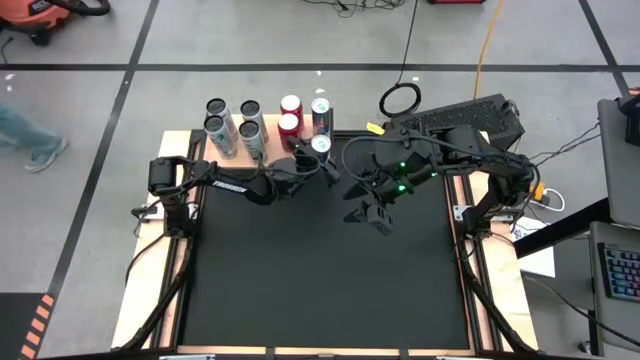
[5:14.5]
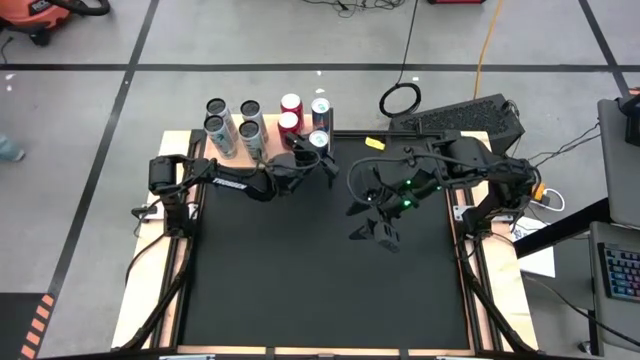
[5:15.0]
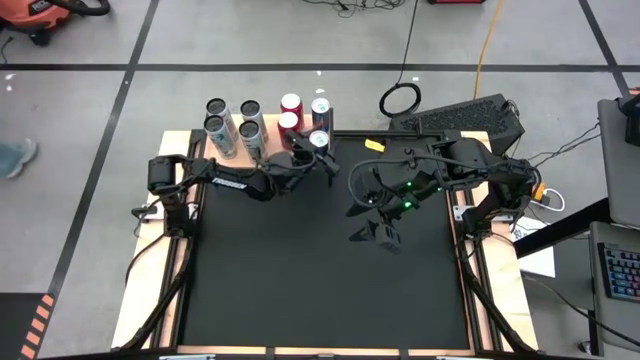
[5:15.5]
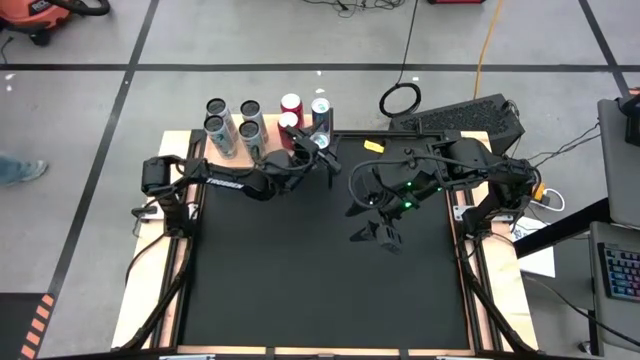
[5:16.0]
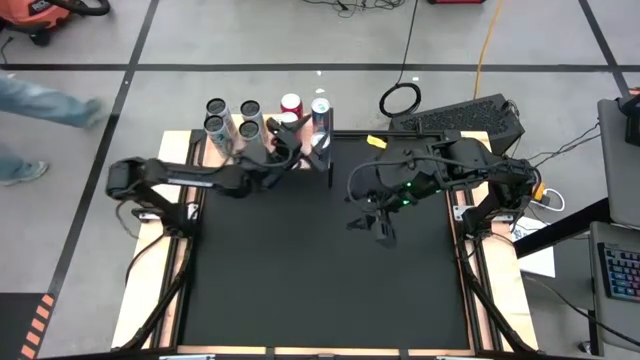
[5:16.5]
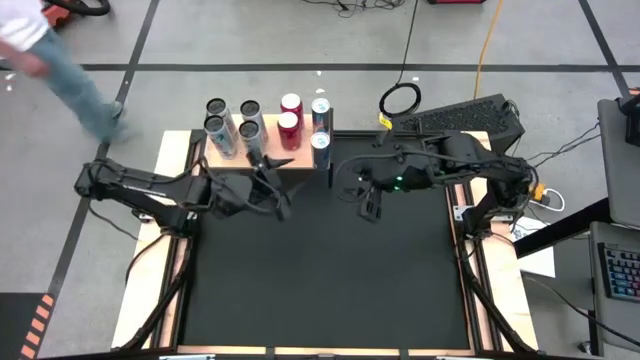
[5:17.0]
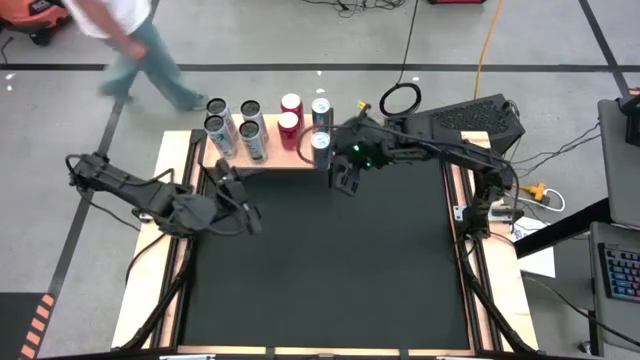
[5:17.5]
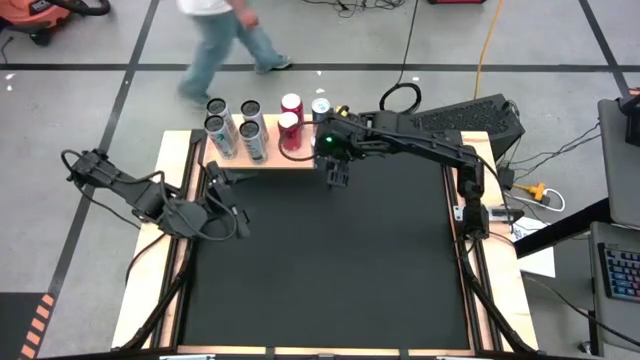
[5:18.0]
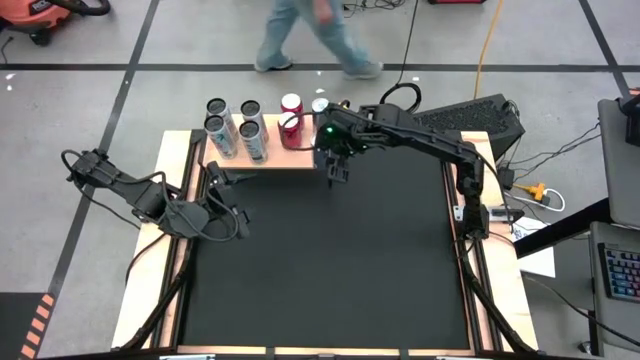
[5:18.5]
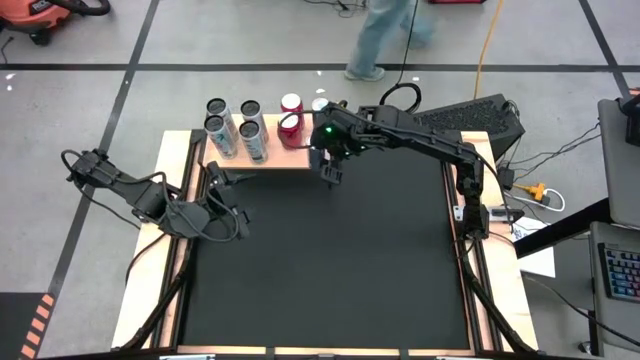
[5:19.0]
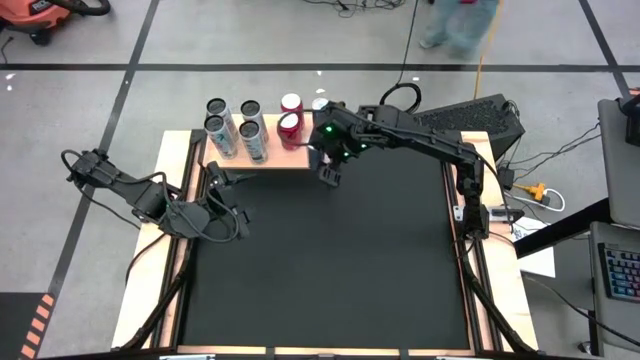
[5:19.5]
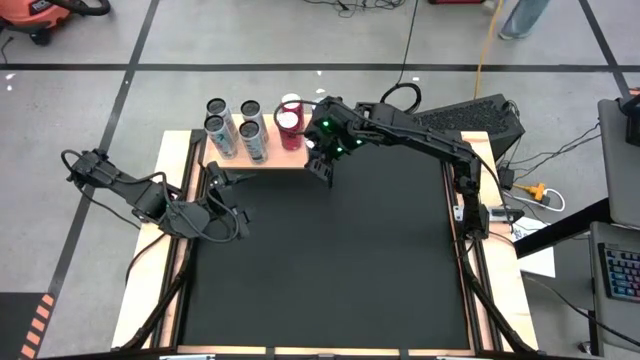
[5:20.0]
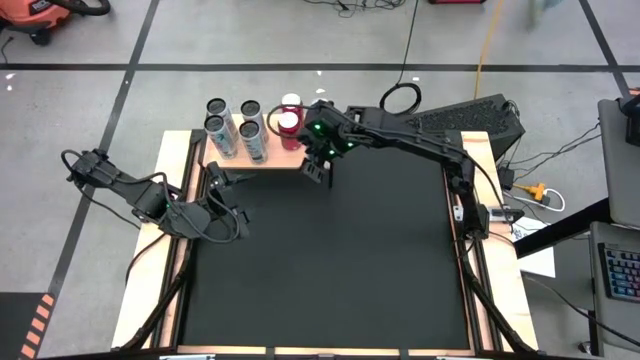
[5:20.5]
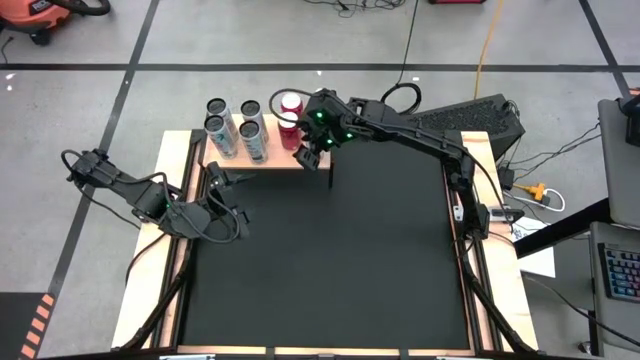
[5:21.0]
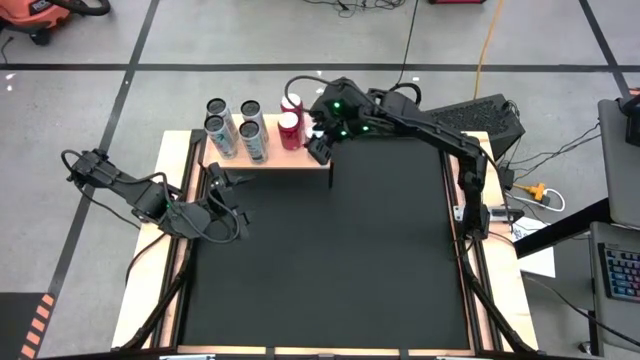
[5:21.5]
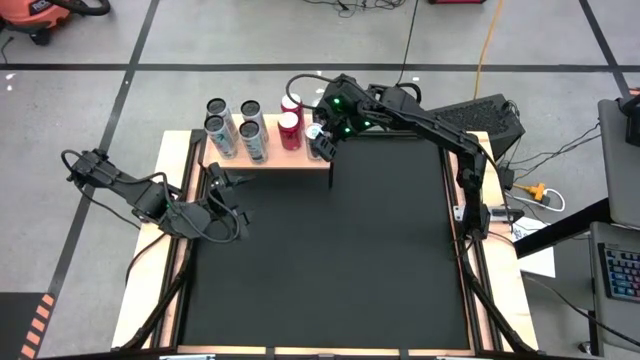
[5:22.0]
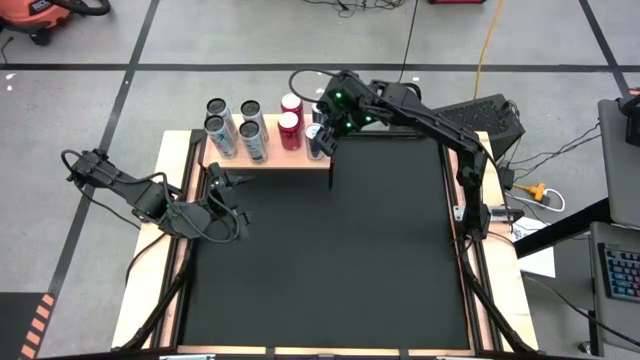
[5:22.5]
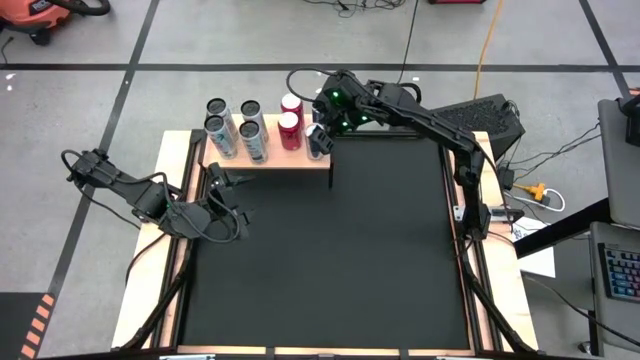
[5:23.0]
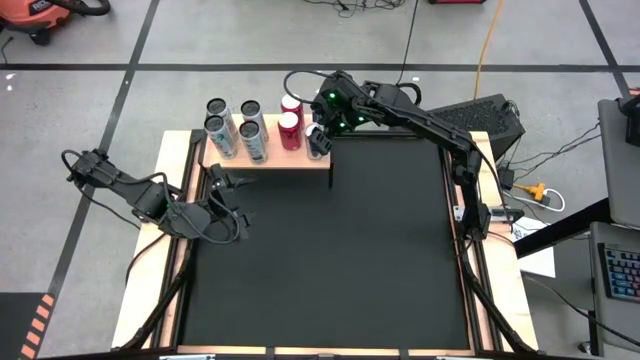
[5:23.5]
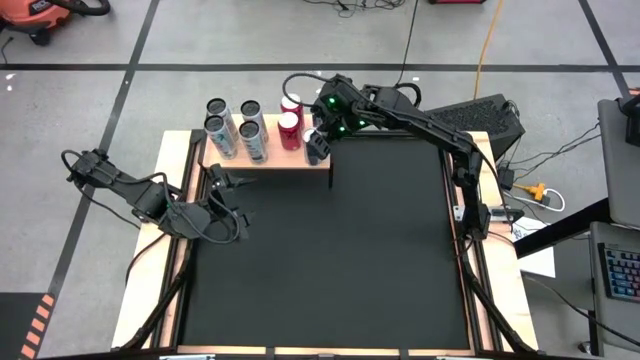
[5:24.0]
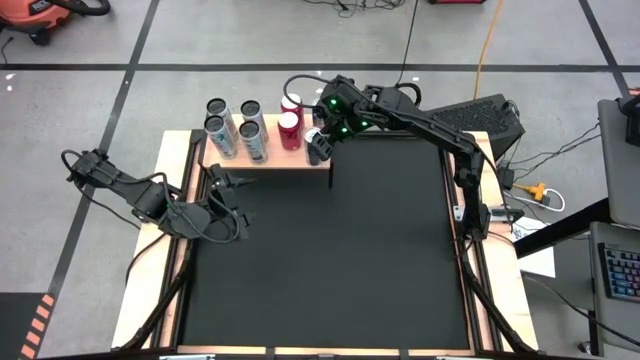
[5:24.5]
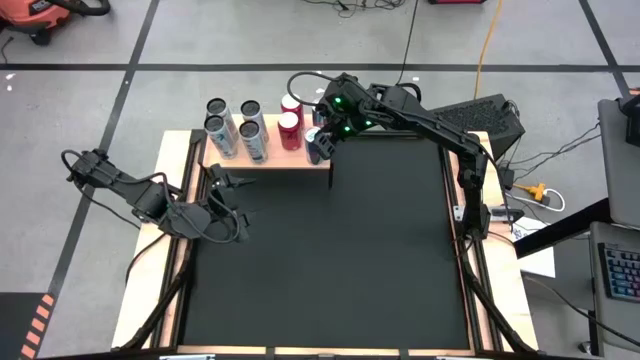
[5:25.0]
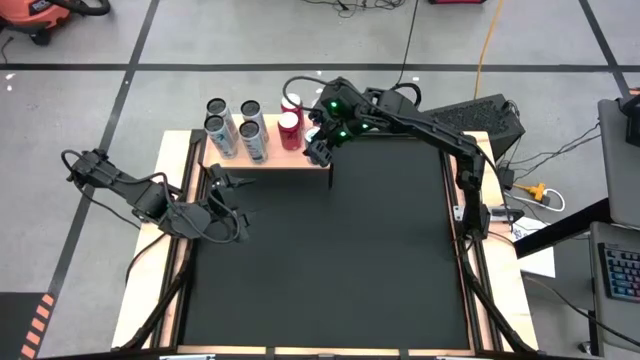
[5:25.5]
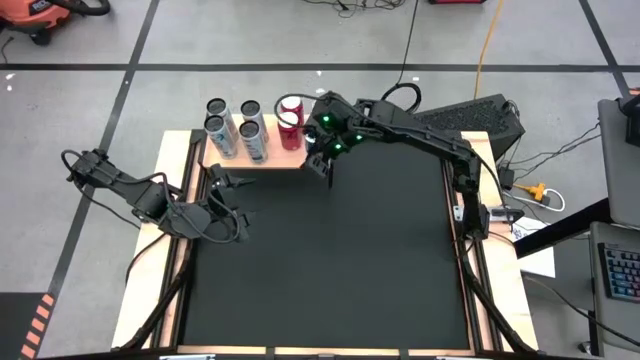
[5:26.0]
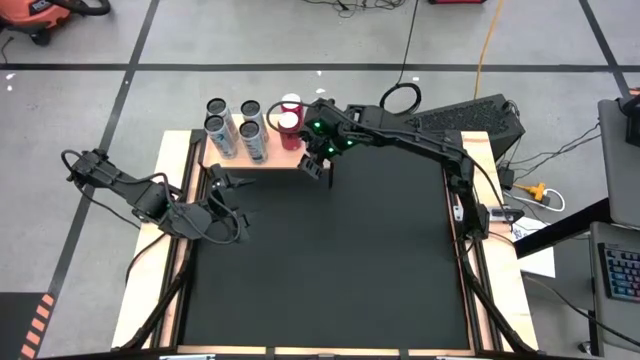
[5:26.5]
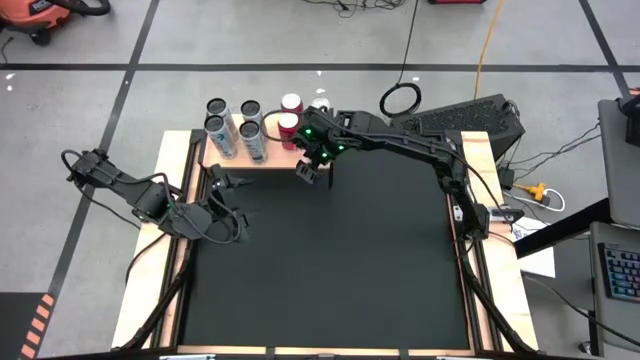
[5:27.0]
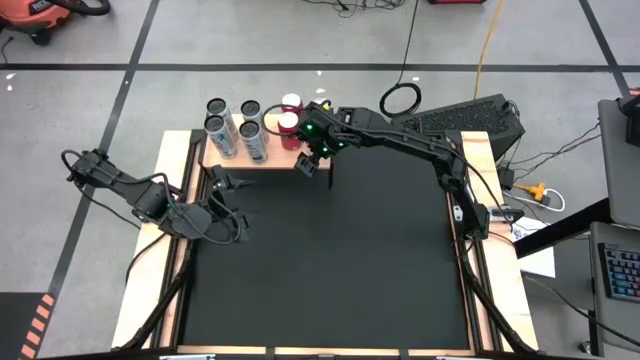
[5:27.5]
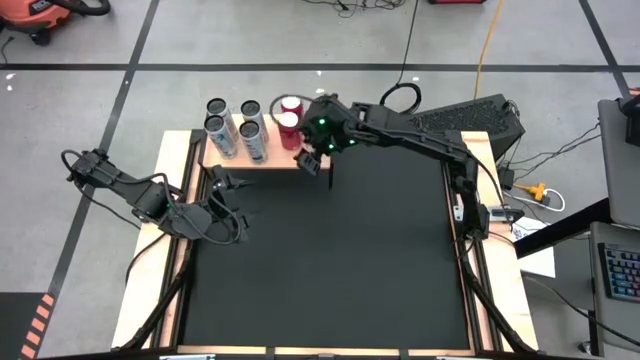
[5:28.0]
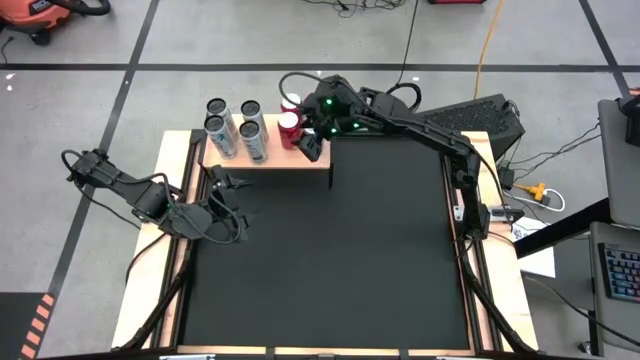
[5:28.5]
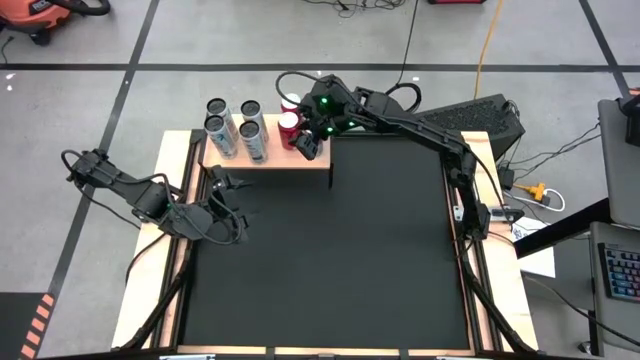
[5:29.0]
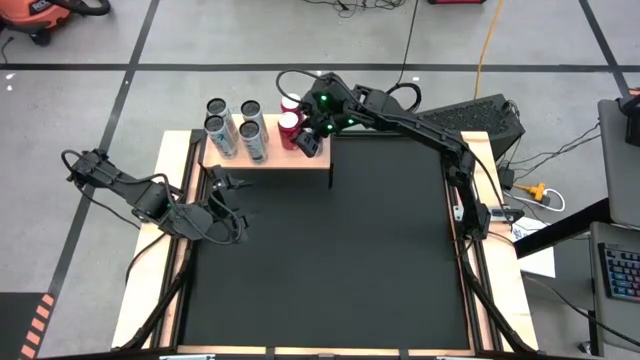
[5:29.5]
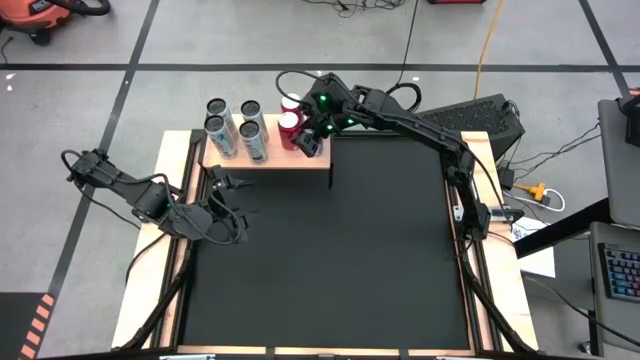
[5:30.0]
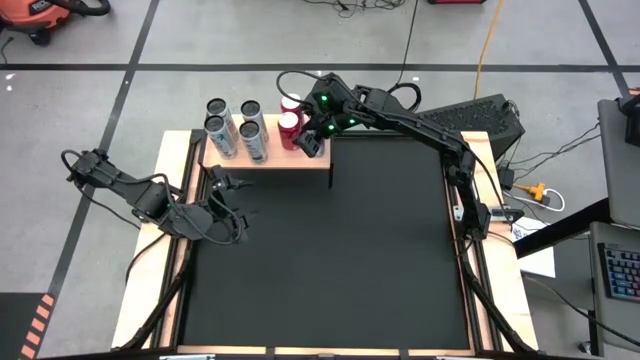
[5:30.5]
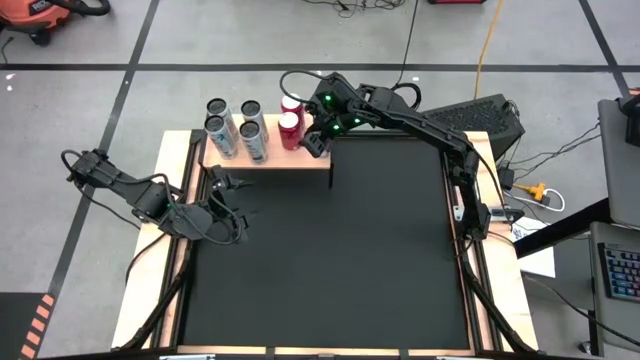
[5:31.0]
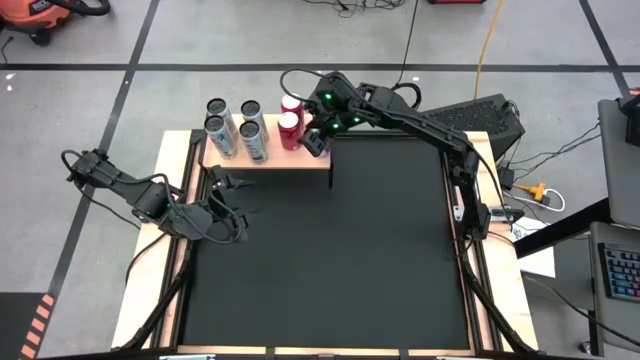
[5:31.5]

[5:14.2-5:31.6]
Task: Place canned beverage on shelf
Put the blue soda can aligned with the blue soda can on the shelf

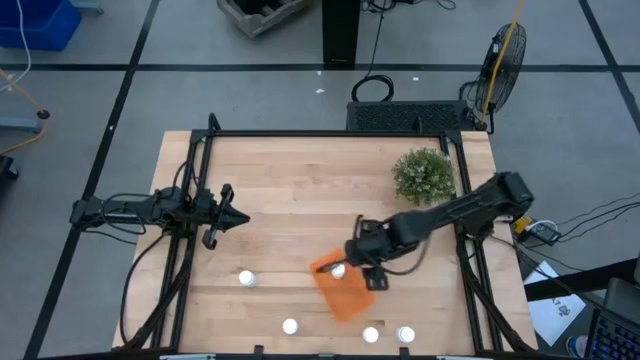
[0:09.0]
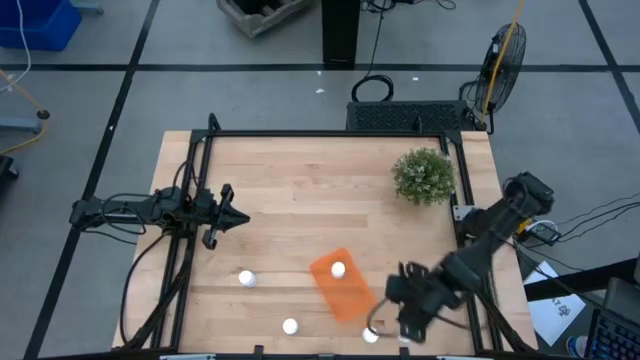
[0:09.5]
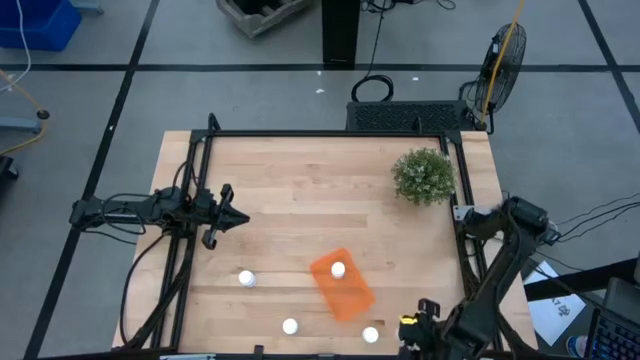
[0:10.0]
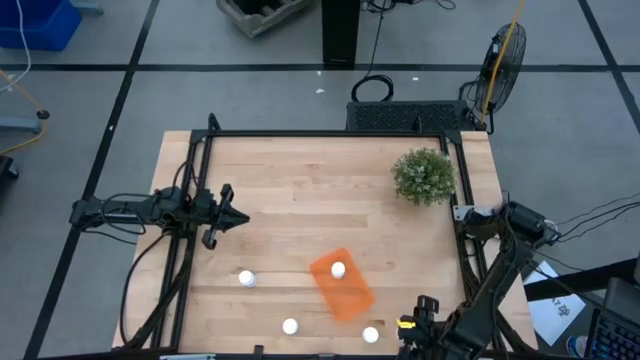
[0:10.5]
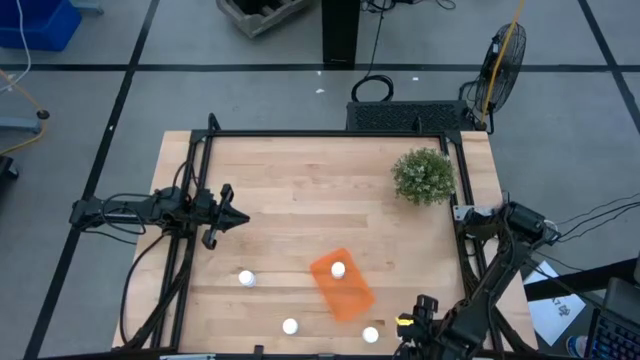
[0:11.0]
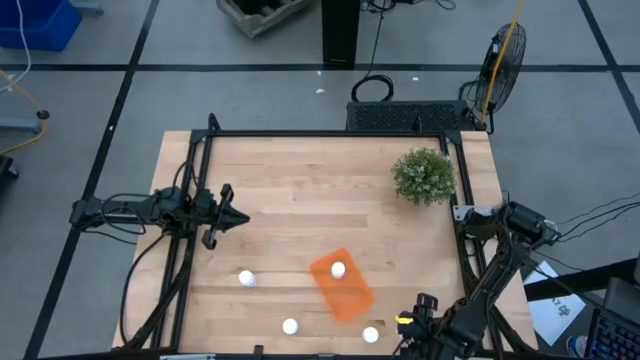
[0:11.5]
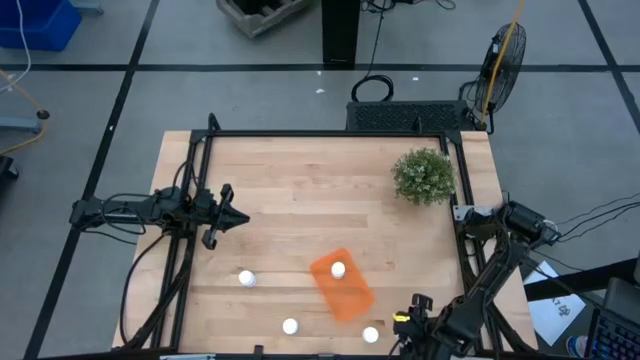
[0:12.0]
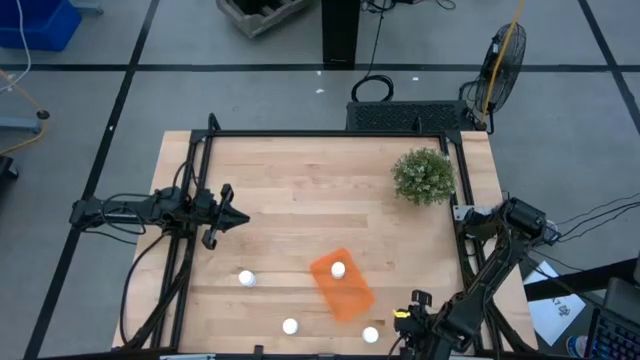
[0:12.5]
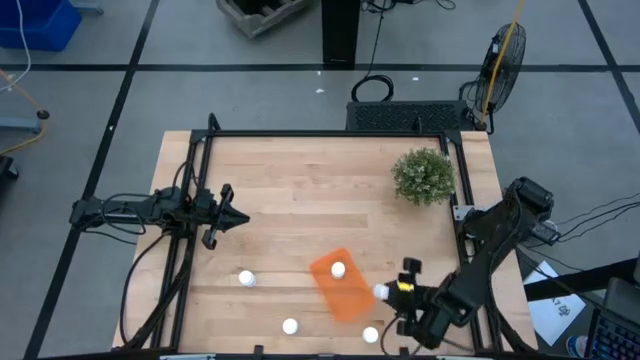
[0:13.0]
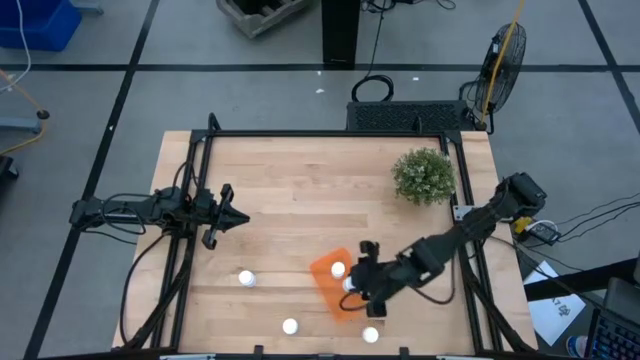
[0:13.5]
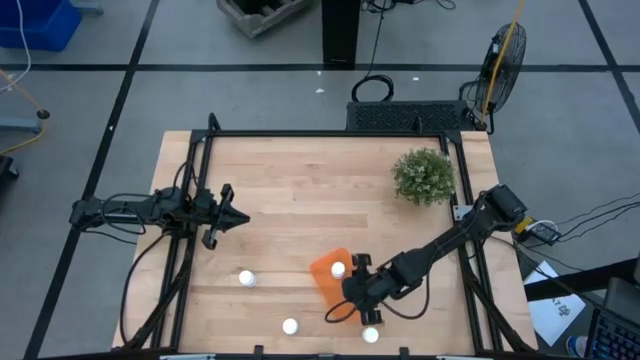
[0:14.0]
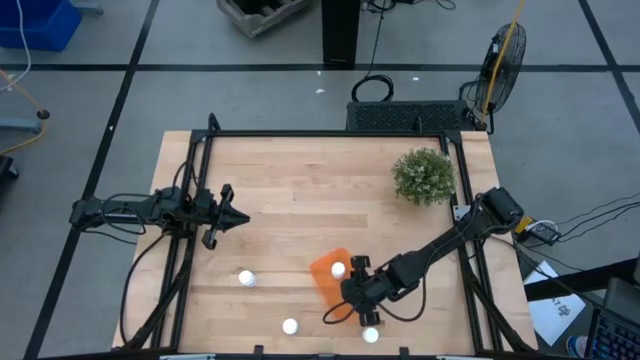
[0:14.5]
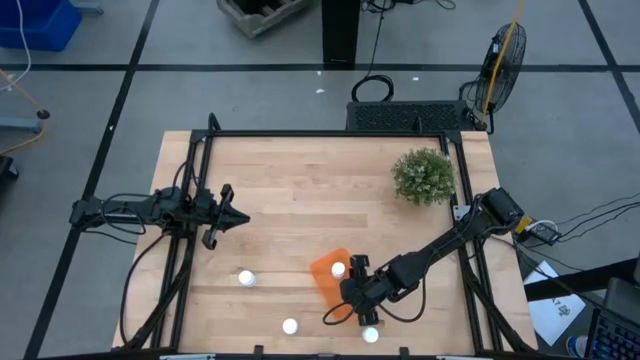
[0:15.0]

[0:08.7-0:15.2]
Task: Pick and place pill bottles into a basket
Put the white pill bottle into the orange bin
